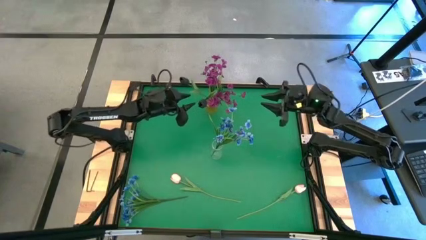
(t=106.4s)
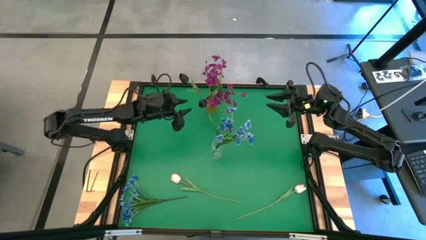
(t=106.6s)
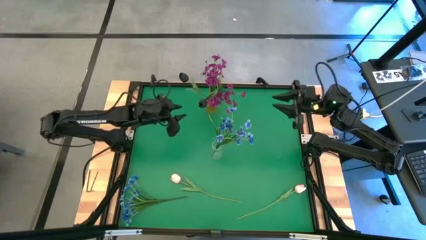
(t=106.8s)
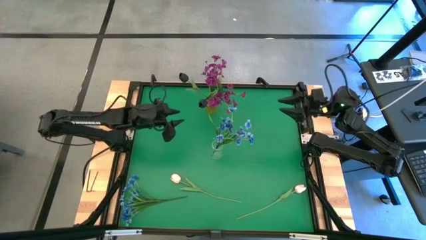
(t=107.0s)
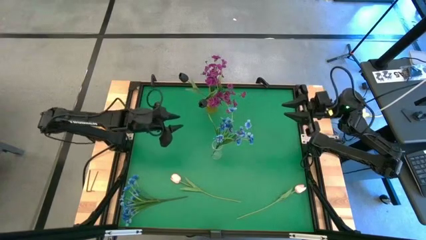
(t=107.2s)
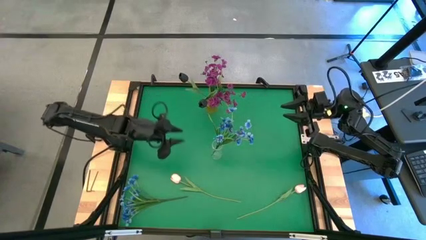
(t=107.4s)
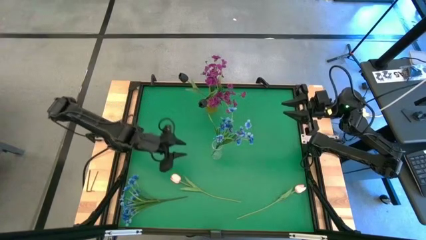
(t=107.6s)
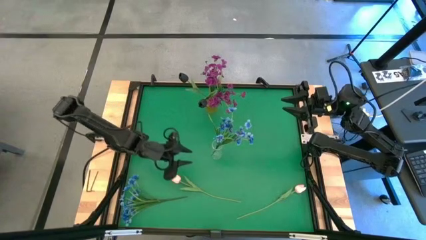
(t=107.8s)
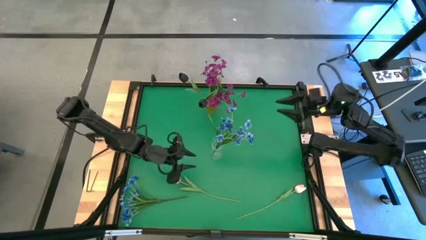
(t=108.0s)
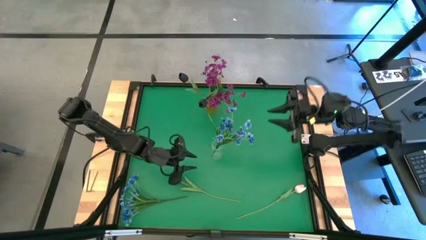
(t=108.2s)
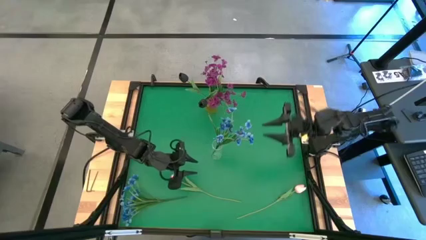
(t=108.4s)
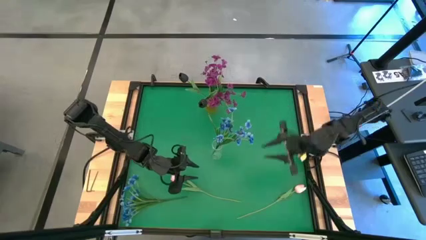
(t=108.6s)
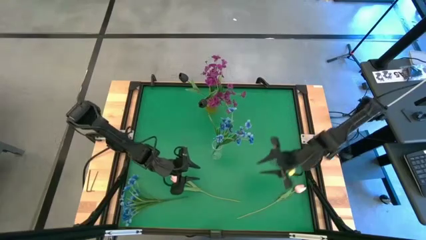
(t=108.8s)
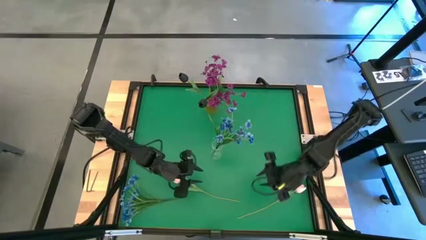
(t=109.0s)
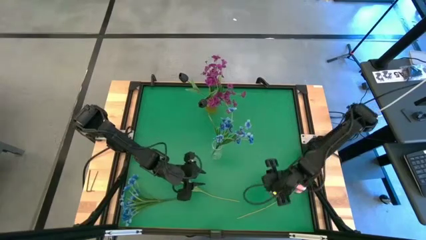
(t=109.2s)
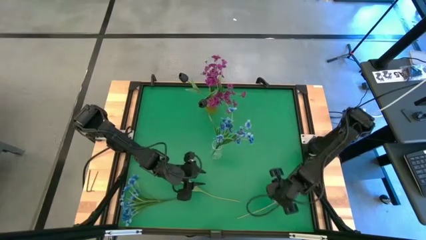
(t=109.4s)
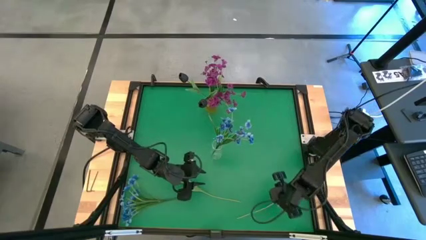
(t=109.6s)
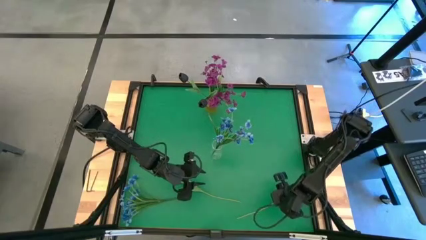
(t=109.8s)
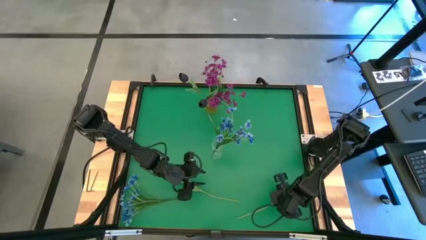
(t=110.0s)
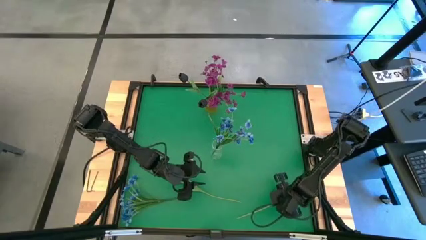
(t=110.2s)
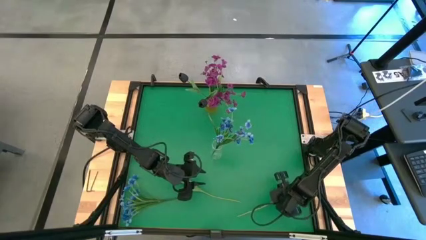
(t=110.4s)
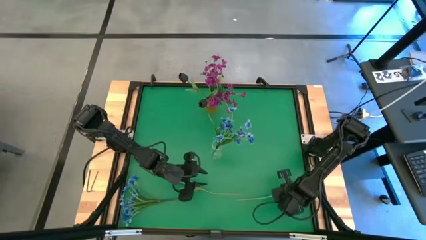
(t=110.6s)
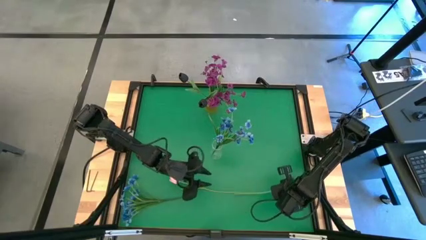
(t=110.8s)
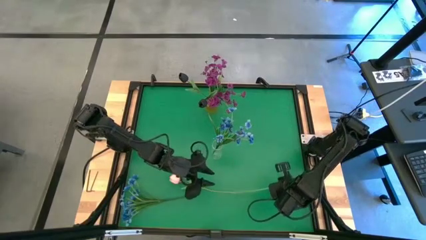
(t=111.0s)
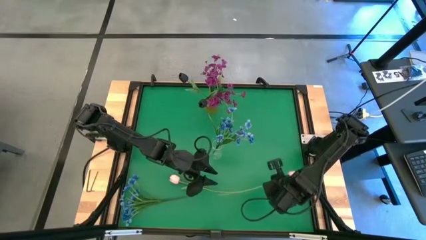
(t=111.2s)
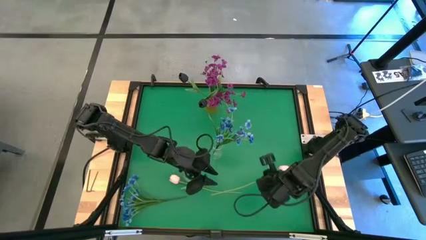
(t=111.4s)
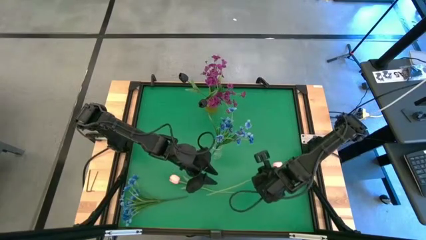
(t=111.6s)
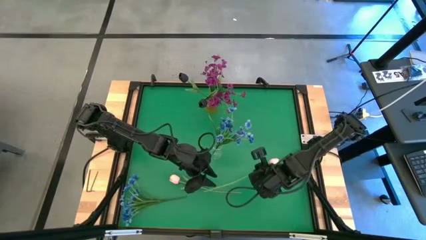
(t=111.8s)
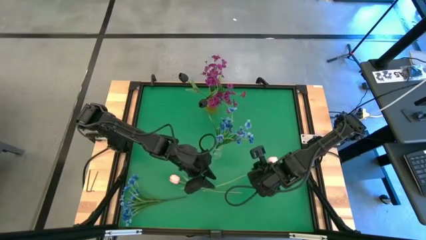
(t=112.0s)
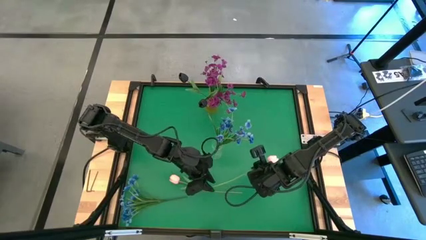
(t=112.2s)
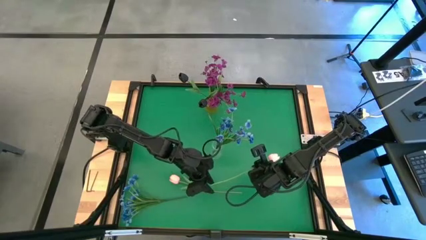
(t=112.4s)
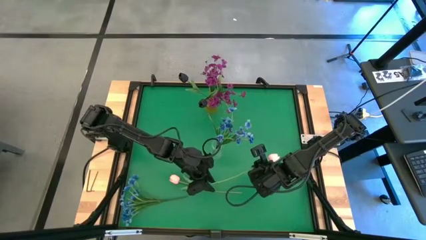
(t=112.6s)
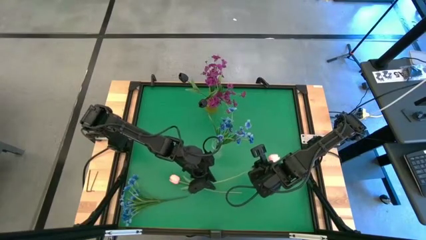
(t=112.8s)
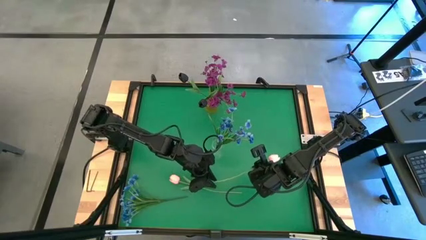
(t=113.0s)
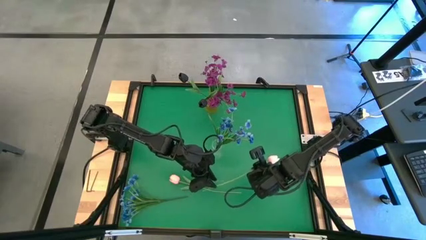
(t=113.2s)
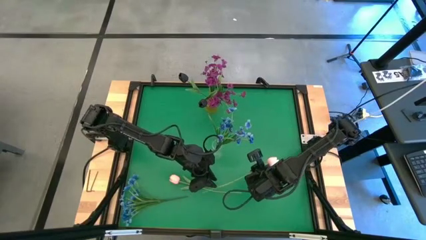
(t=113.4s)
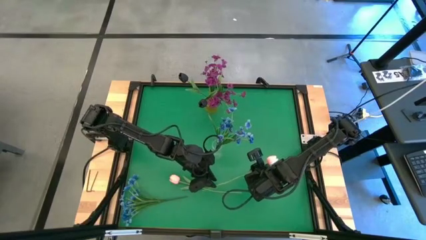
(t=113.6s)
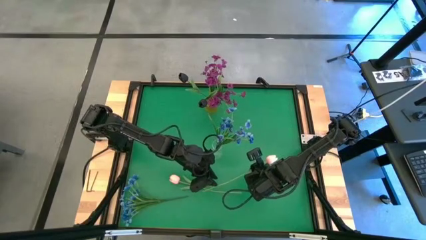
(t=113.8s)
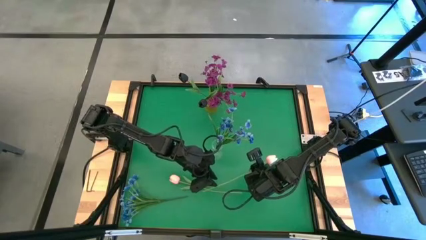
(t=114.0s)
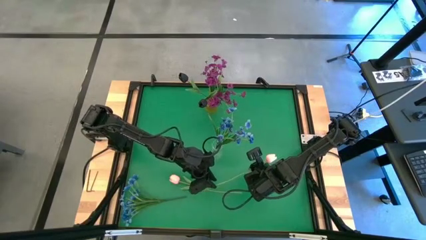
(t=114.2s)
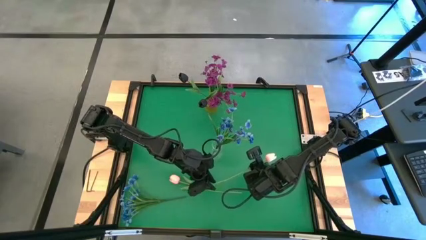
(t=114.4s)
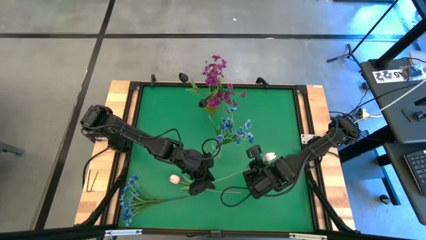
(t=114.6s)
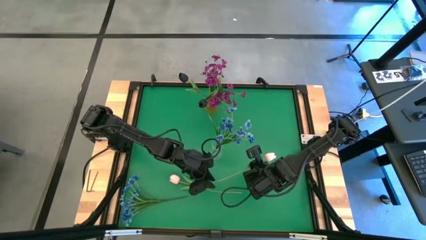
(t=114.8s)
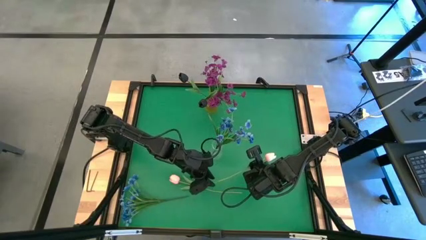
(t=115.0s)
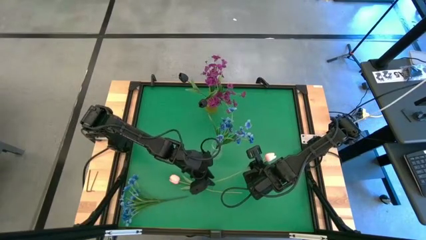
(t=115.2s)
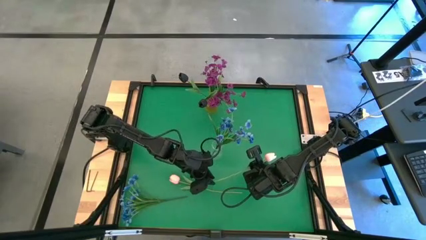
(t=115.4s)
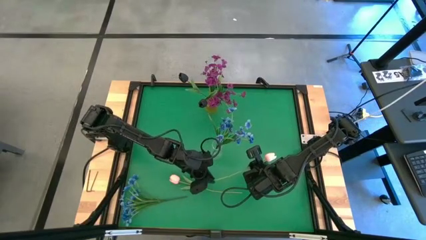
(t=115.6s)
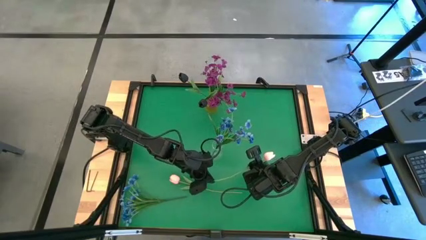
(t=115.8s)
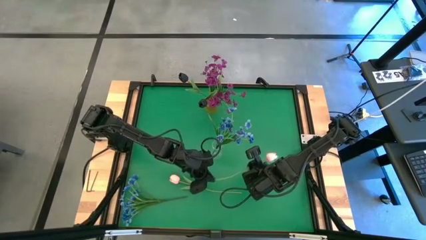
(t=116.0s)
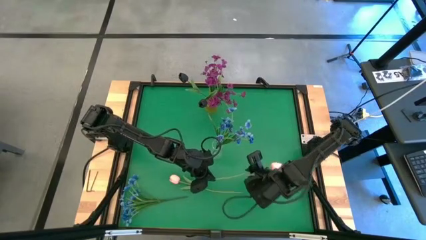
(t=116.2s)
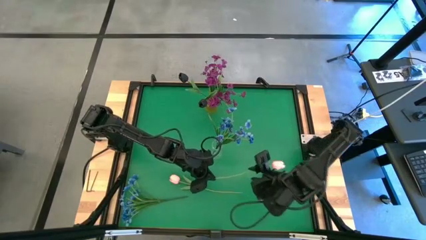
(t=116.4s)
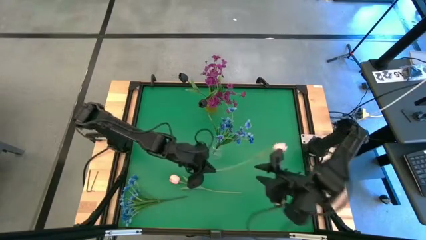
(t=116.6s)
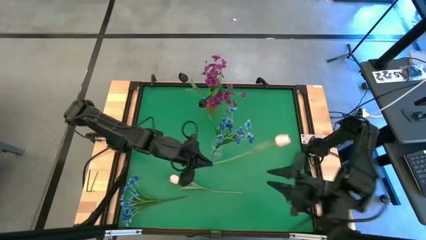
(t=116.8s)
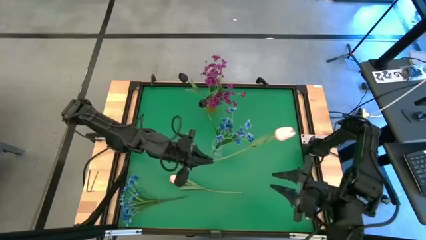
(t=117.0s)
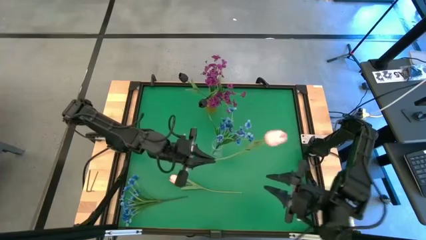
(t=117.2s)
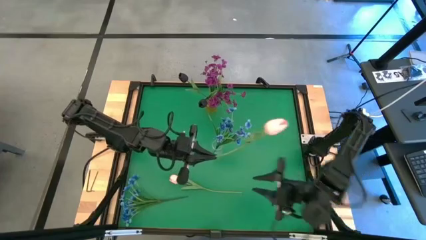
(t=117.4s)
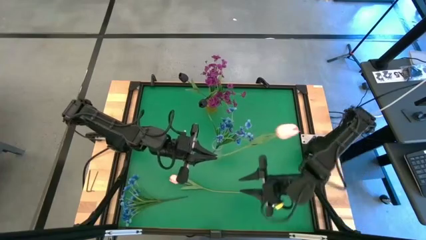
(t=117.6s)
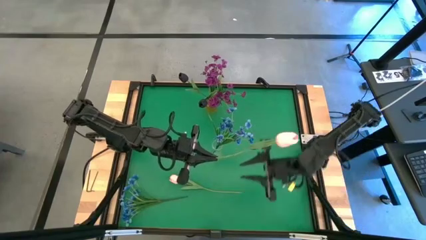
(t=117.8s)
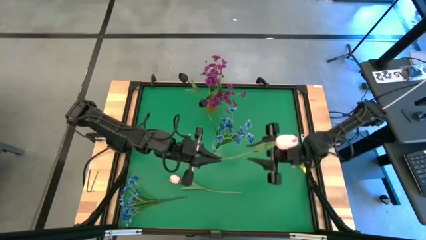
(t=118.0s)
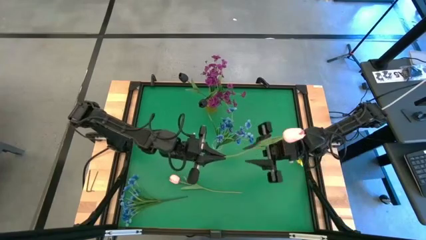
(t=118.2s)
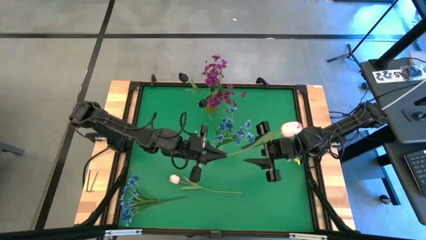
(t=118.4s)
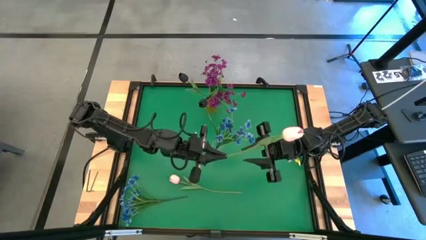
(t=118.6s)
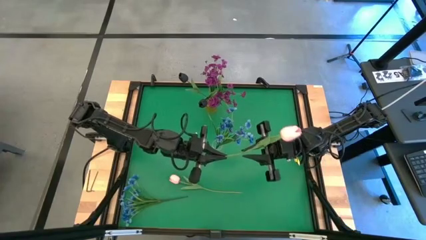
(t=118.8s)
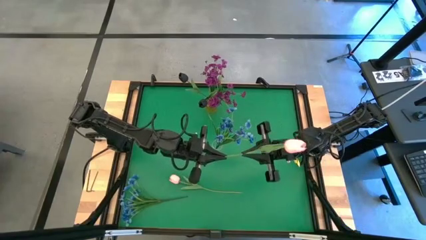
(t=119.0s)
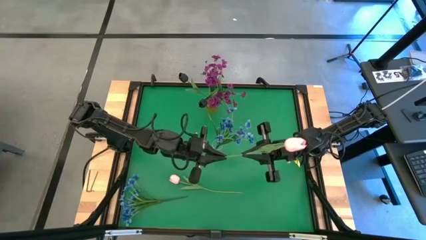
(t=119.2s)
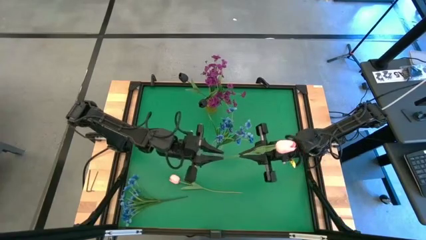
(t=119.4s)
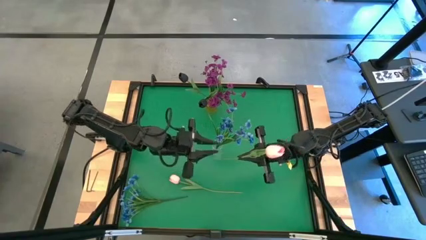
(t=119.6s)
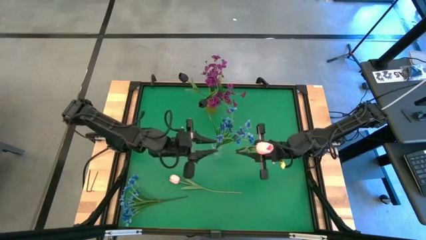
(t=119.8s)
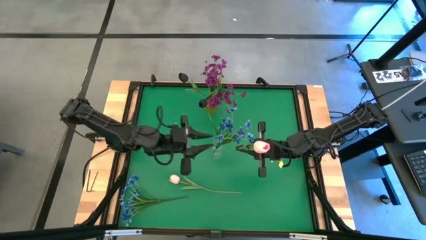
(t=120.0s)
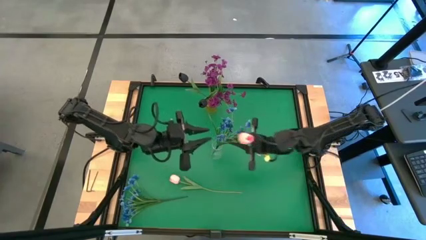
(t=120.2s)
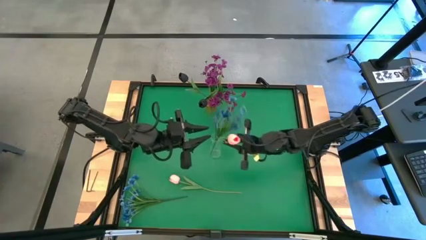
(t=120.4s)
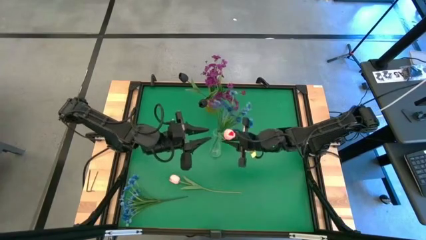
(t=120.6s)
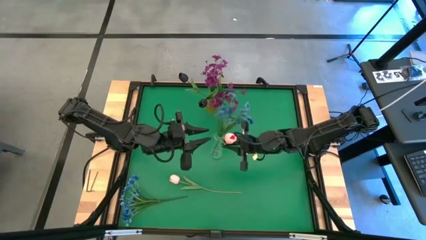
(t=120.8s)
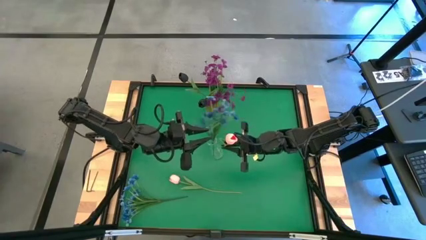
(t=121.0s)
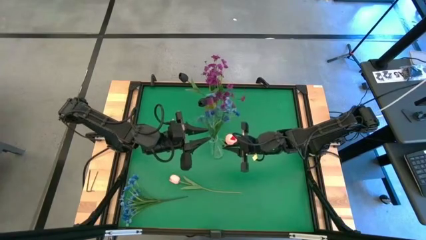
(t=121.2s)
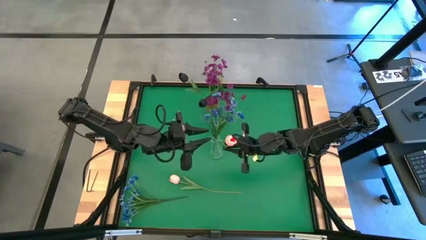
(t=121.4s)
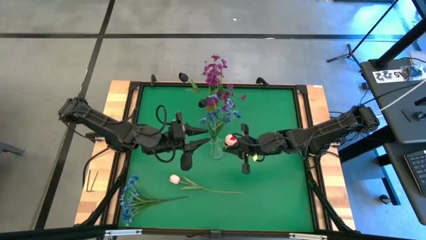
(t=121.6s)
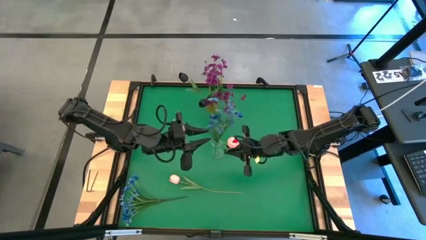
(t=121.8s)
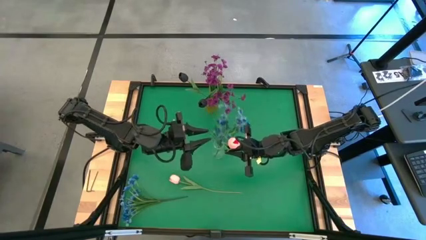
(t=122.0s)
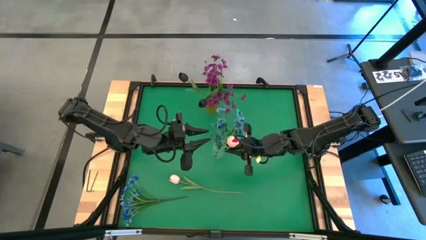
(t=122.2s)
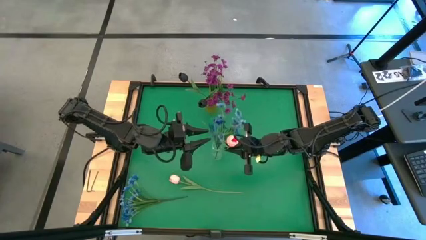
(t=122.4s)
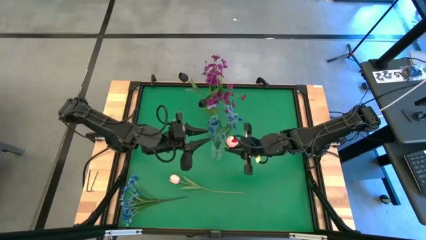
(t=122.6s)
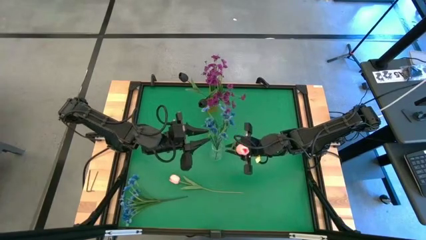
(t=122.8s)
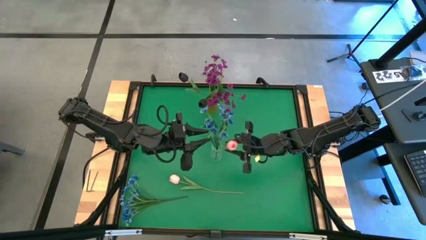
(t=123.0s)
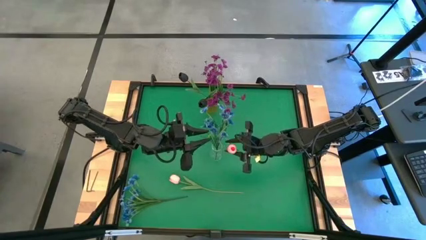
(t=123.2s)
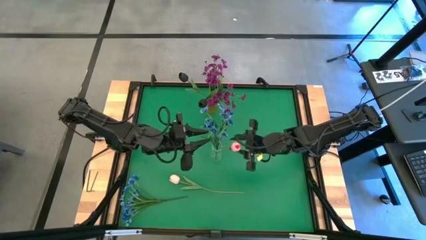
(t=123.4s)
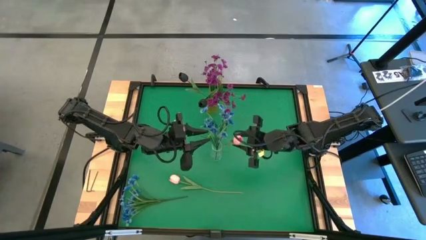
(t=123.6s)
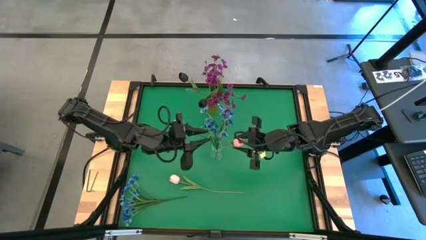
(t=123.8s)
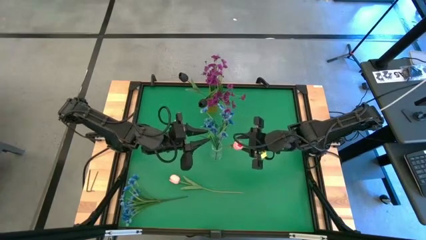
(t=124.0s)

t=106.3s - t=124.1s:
Task: Sort flowers into vase by color
Put the right pink flower into the transparent vase
